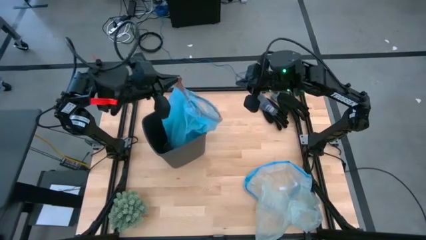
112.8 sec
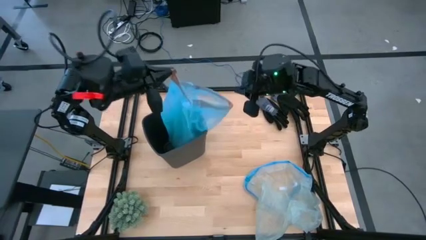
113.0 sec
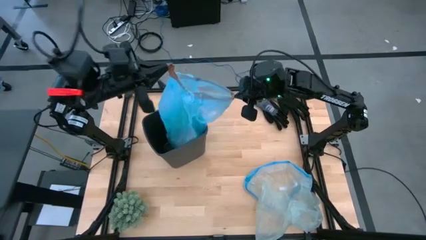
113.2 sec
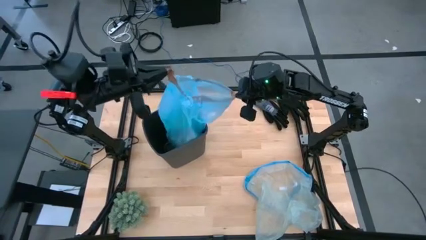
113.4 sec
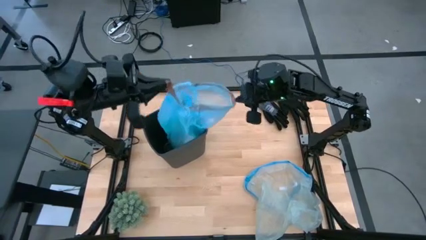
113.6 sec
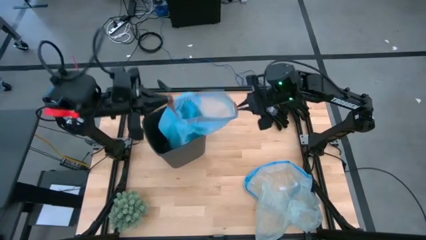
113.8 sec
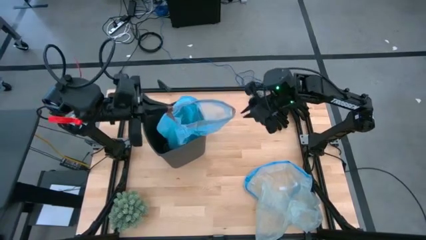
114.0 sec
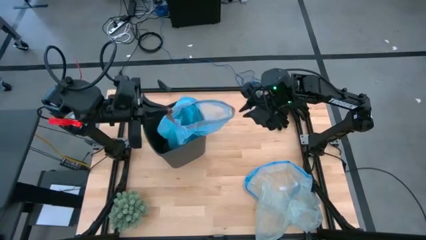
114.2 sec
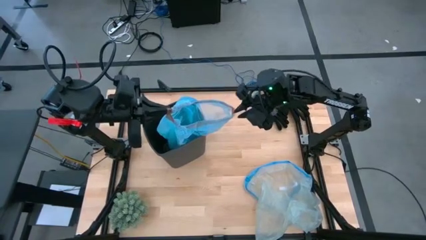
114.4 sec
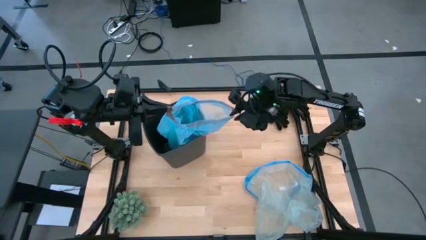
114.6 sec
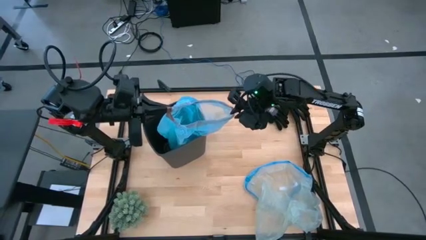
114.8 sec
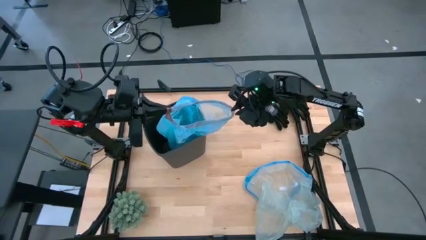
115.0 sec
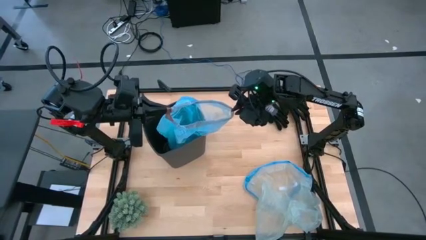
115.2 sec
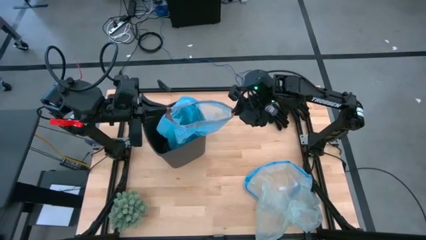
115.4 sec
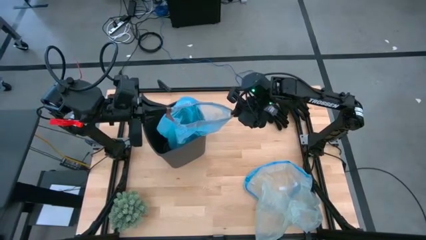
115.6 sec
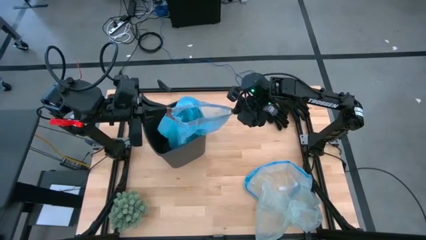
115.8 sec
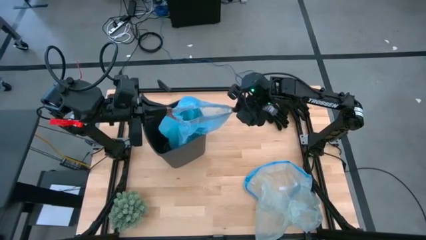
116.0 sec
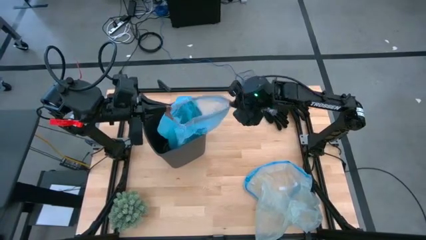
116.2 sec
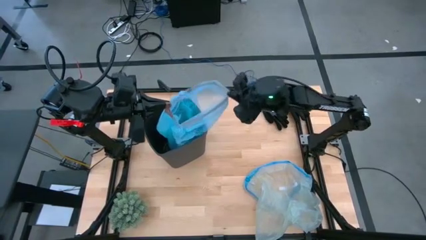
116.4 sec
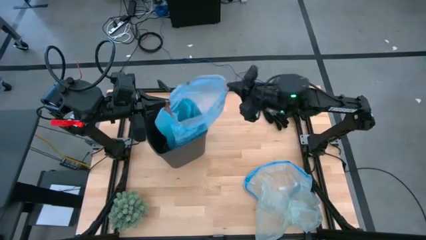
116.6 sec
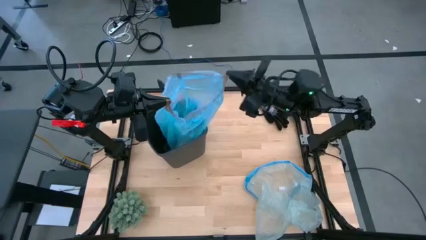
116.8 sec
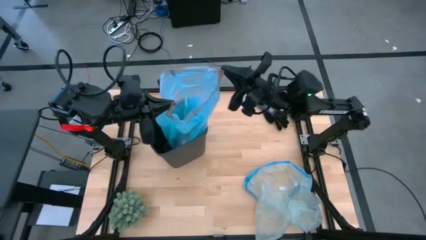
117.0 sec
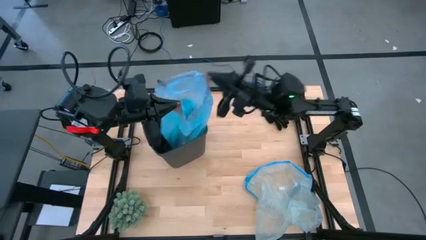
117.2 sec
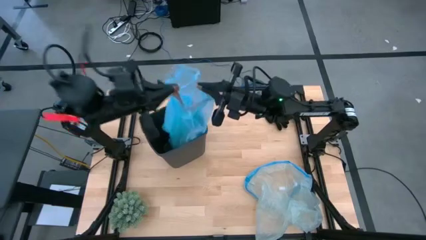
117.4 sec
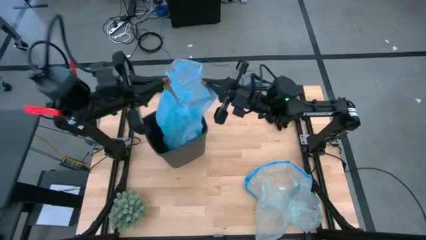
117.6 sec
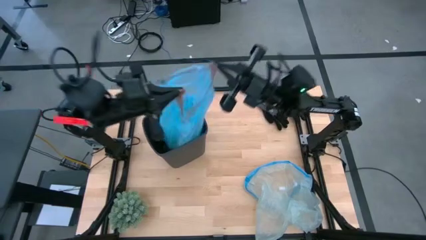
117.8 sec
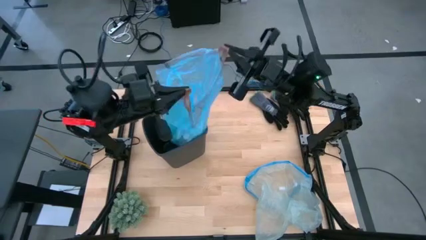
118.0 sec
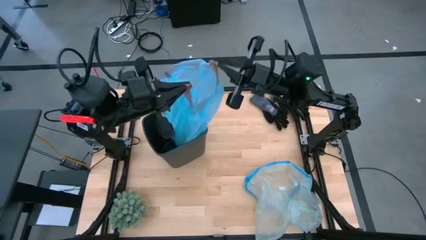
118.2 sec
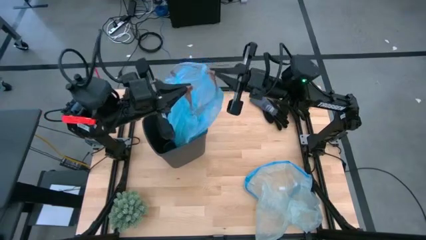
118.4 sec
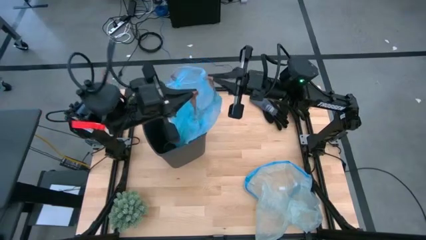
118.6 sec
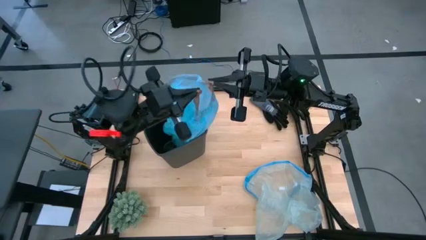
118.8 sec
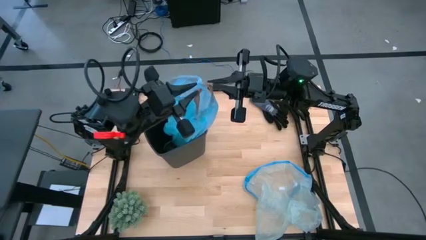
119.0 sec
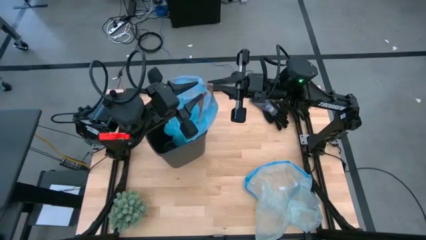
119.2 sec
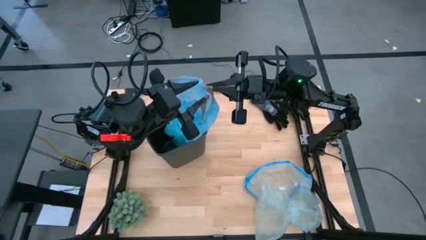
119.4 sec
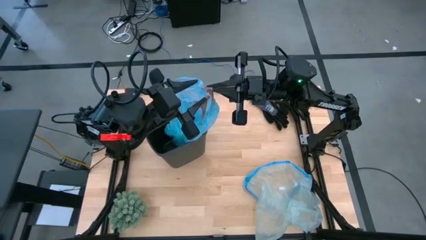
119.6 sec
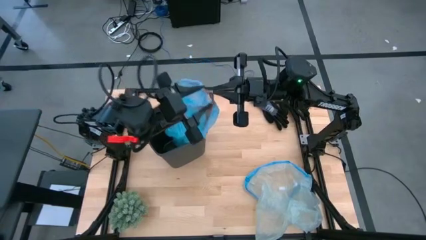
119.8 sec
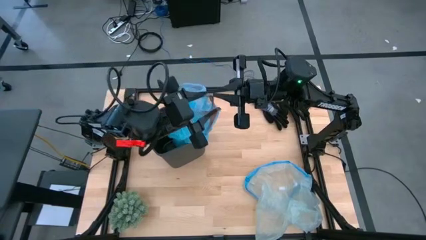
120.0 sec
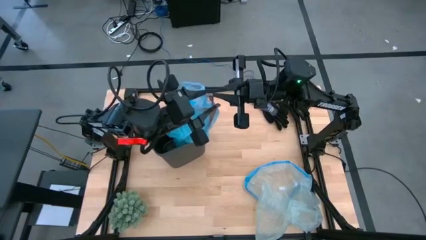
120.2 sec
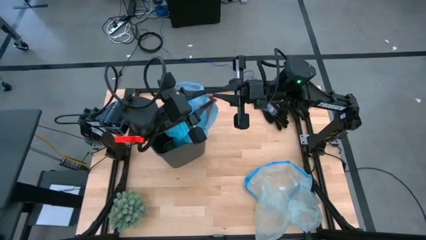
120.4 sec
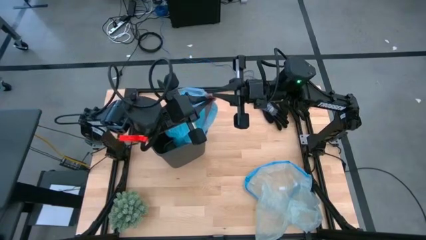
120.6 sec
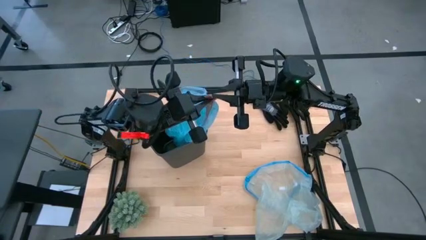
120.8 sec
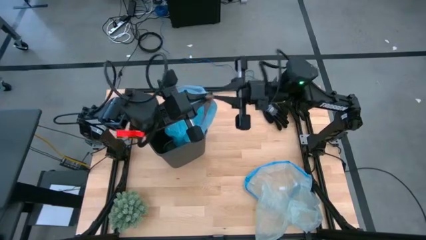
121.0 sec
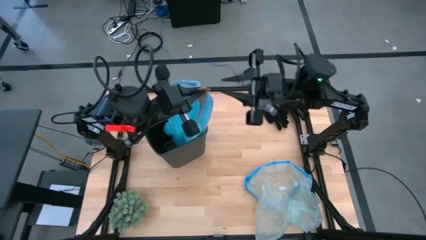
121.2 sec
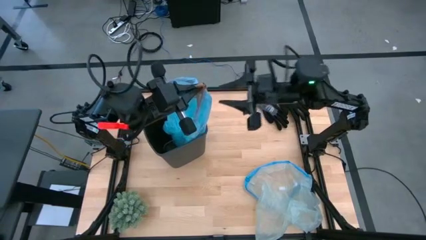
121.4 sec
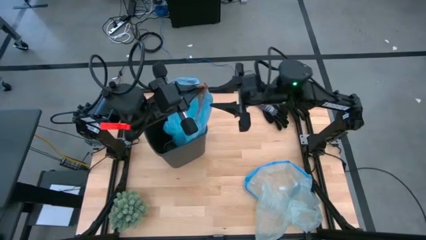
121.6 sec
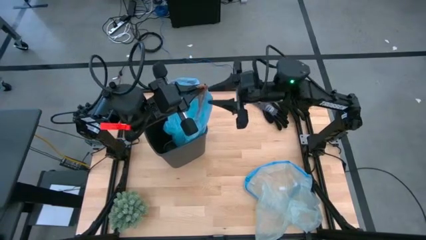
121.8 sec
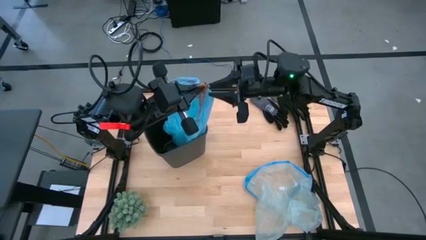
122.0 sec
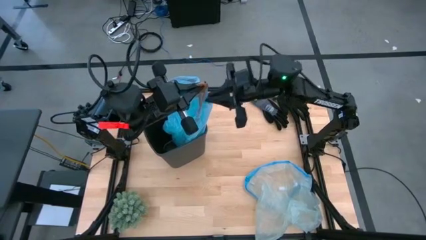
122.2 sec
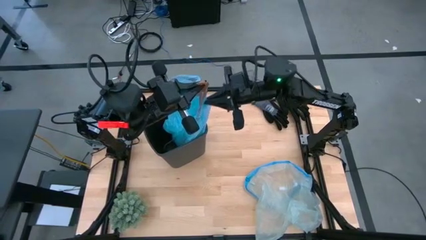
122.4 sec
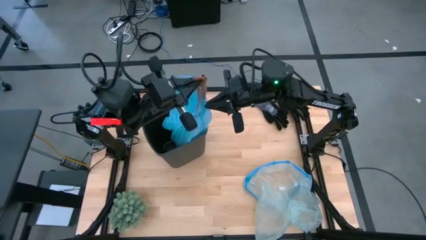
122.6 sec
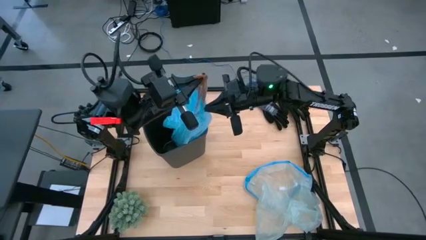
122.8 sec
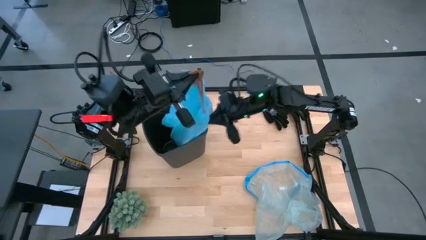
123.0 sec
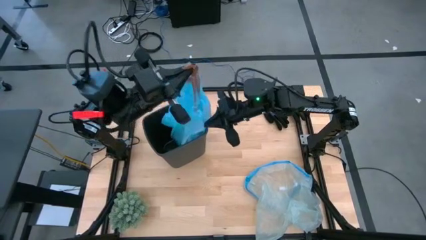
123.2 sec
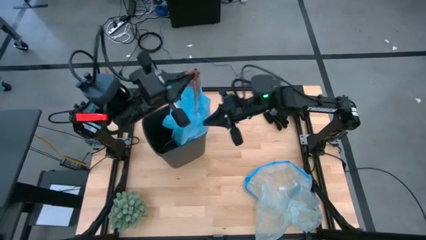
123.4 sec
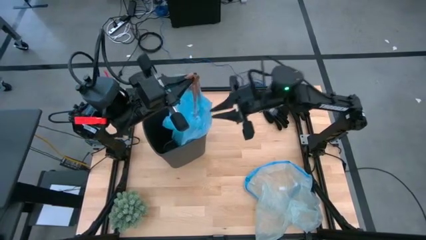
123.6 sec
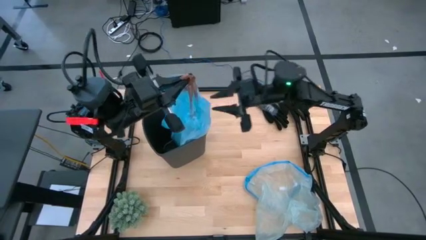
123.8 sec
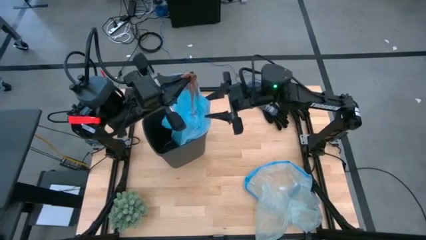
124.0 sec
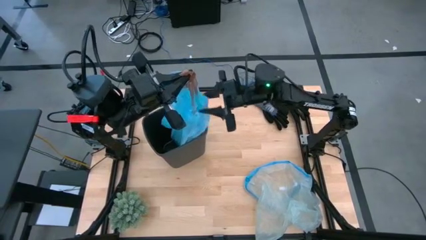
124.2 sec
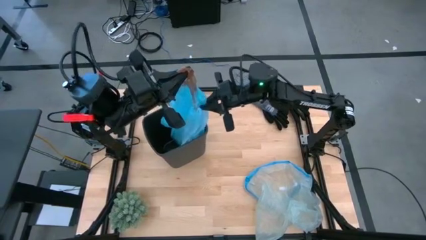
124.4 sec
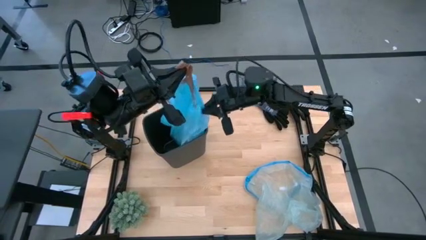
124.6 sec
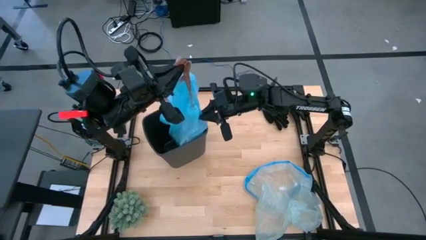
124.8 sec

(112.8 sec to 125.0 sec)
Task: place trash/remove bag and relplace
Remove the trash bag from the bin

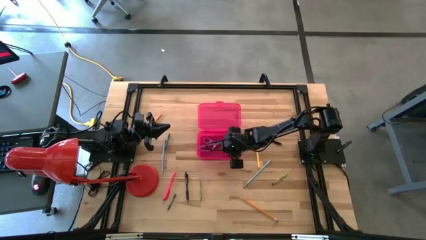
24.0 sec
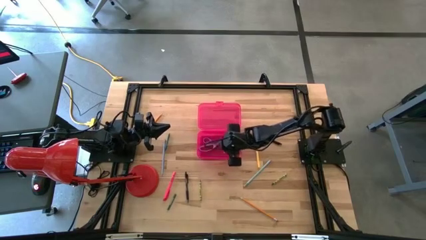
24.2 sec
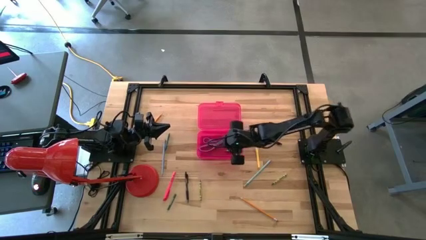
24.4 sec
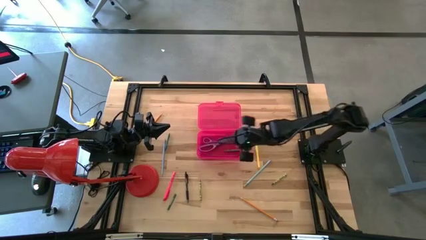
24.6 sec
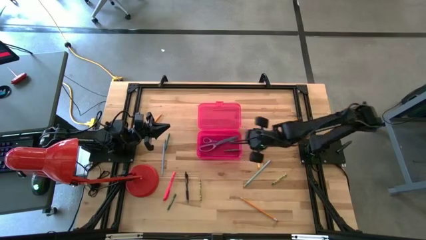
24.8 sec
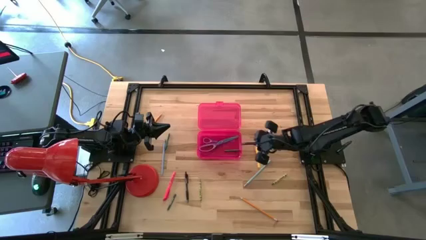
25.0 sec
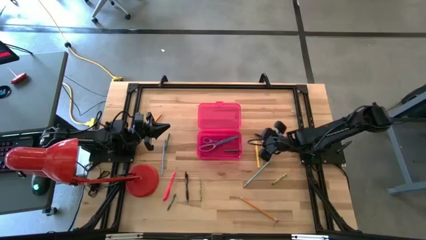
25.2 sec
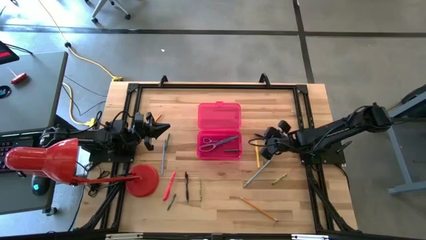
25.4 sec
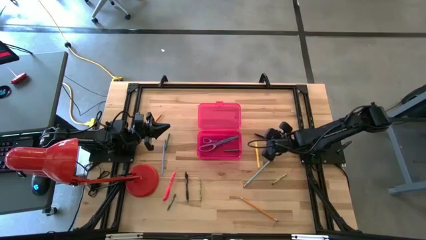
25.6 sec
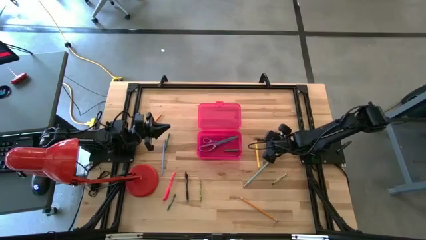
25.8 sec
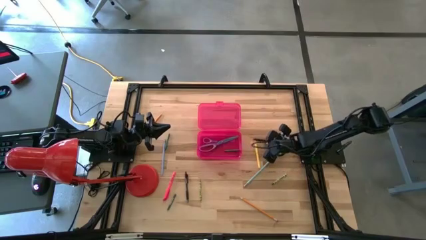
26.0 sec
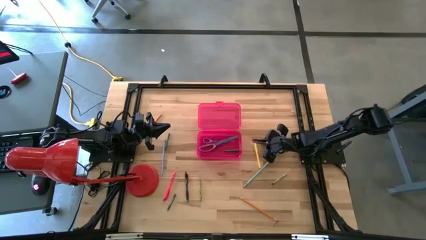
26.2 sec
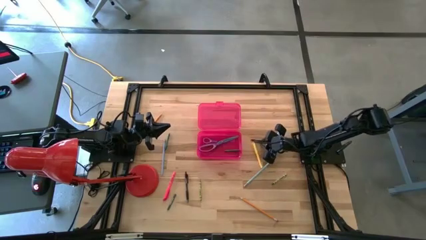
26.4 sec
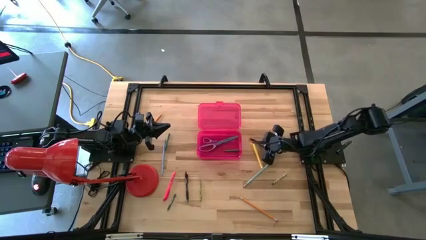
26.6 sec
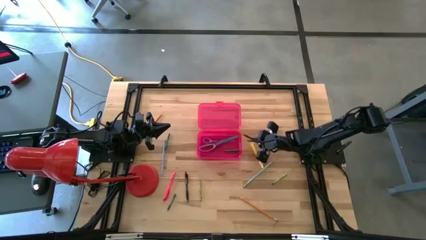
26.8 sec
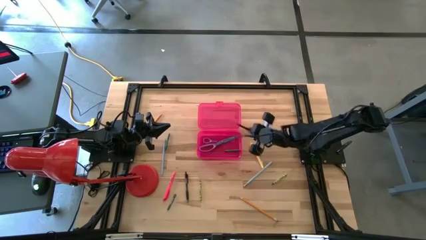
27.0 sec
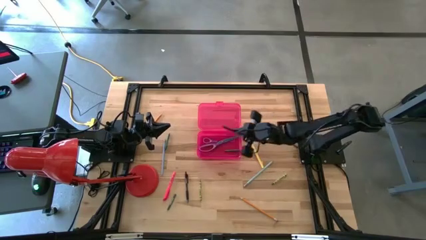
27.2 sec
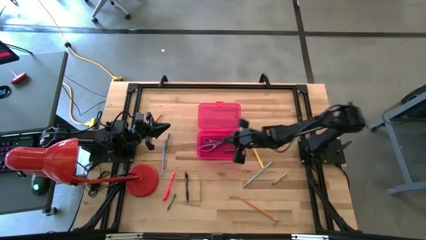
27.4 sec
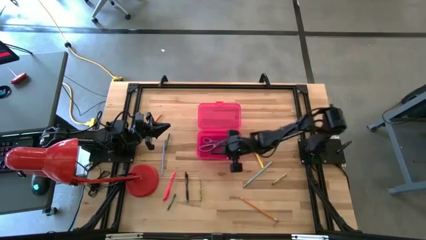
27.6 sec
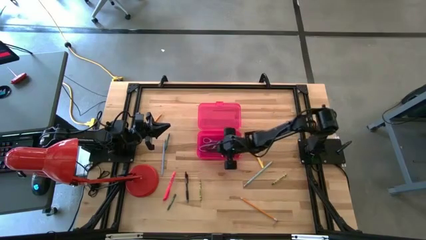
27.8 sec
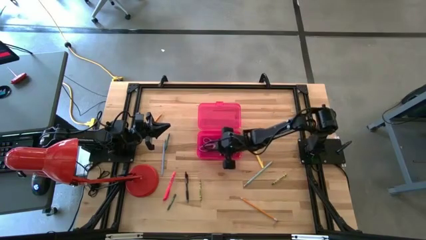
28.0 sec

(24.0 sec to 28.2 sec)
Task: Pick & place school supplies into a supply box
Put the black pen into the pink supply box

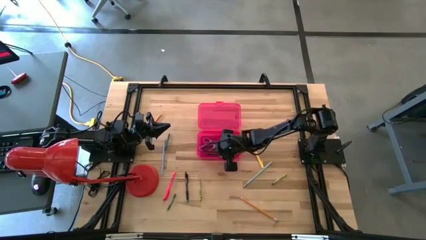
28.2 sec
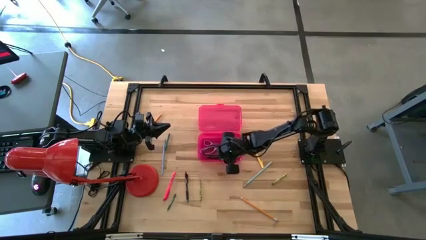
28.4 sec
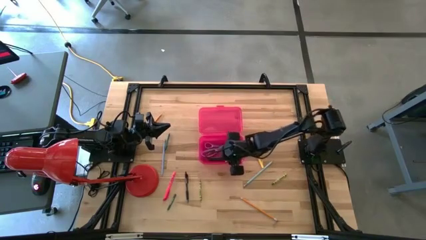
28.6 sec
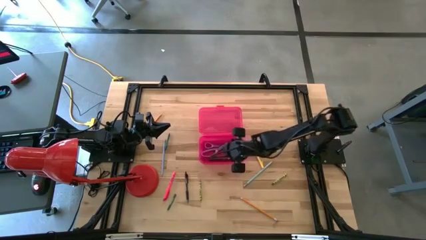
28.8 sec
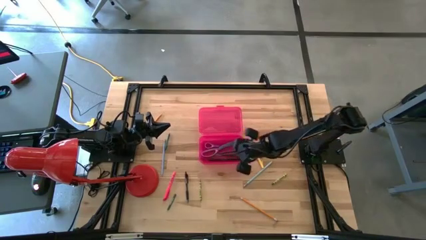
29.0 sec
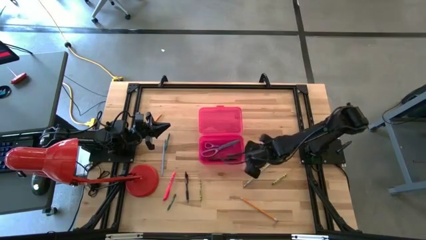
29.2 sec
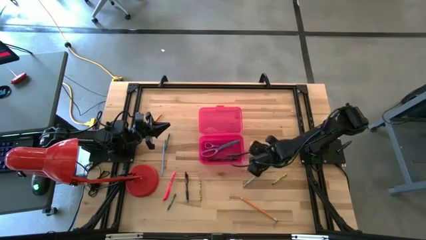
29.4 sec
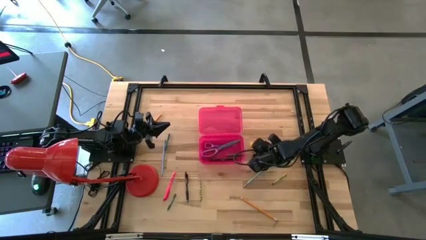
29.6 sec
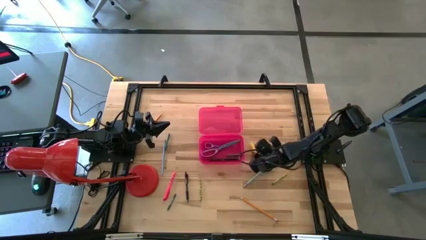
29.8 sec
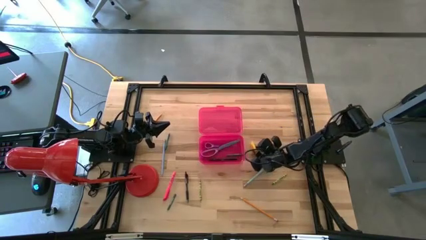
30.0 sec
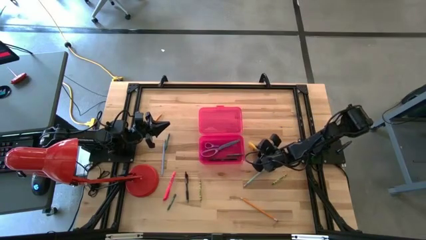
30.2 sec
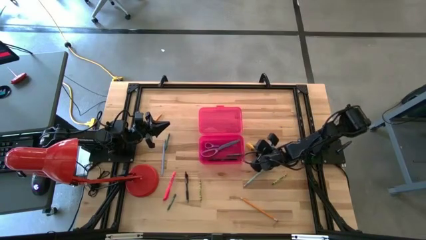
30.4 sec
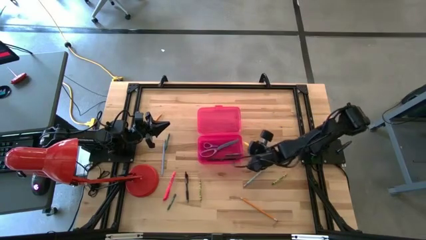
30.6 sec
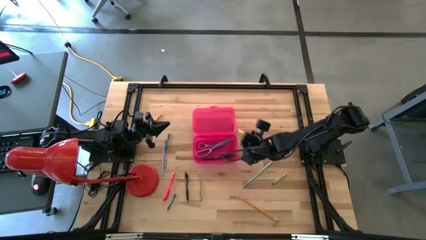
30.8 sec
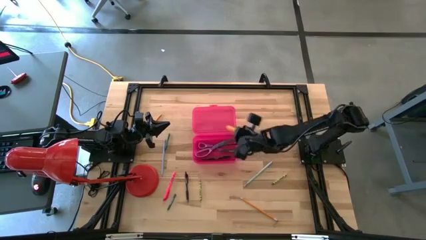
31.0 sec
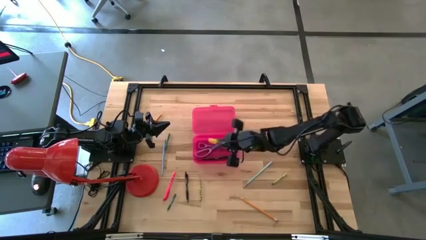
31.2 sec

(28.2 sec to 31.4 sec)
Put the yellow pen into the pink supply box
